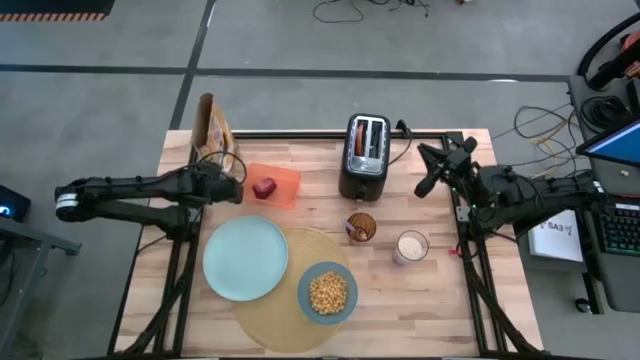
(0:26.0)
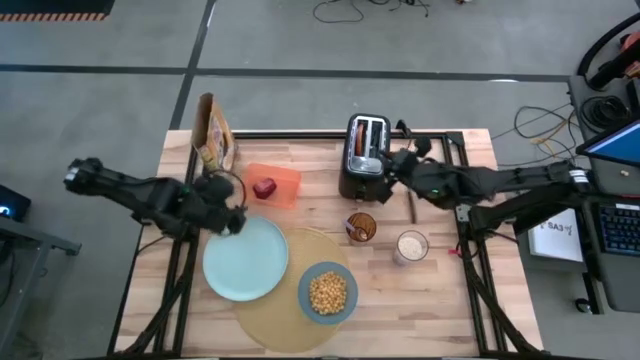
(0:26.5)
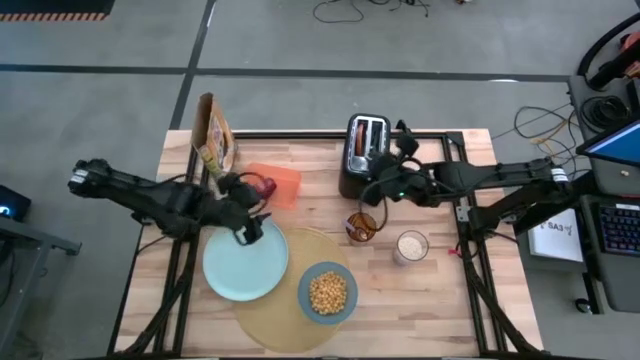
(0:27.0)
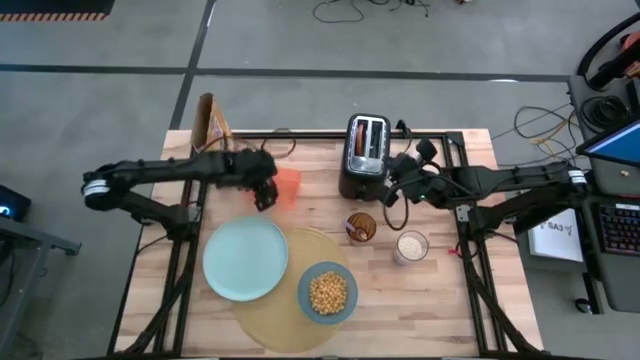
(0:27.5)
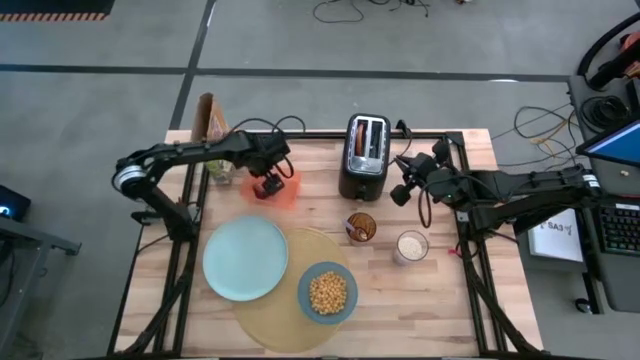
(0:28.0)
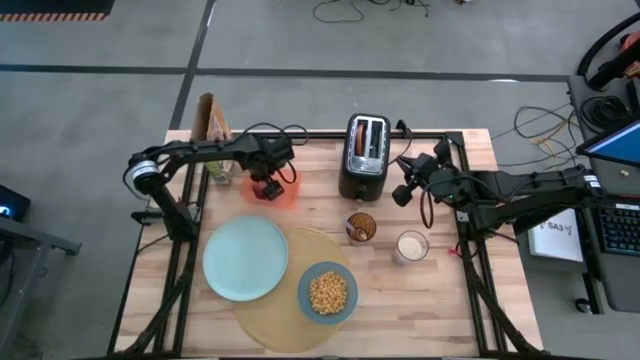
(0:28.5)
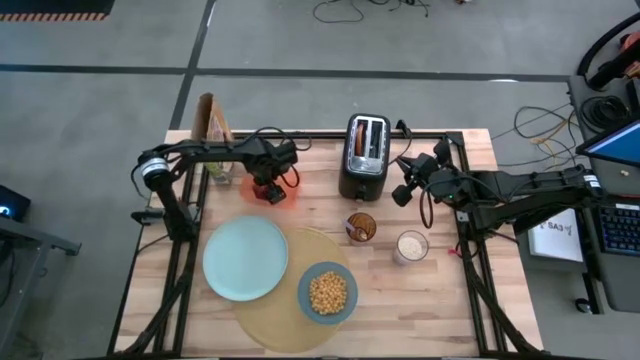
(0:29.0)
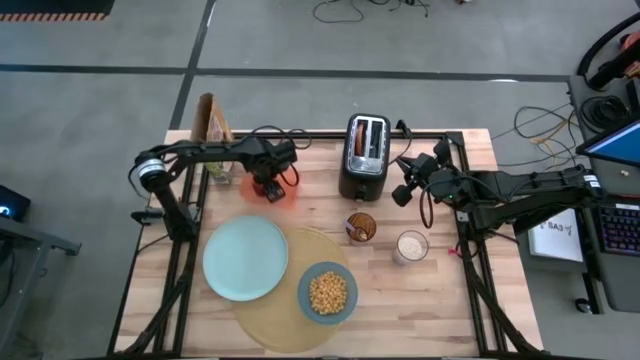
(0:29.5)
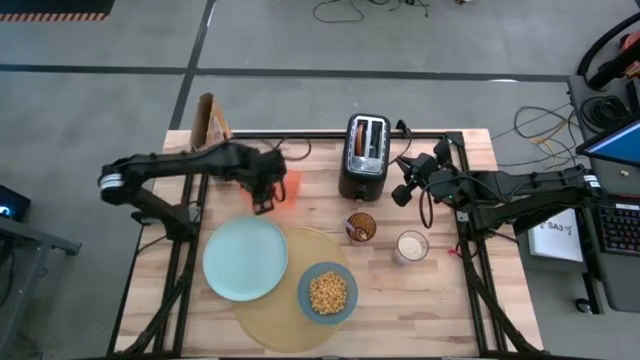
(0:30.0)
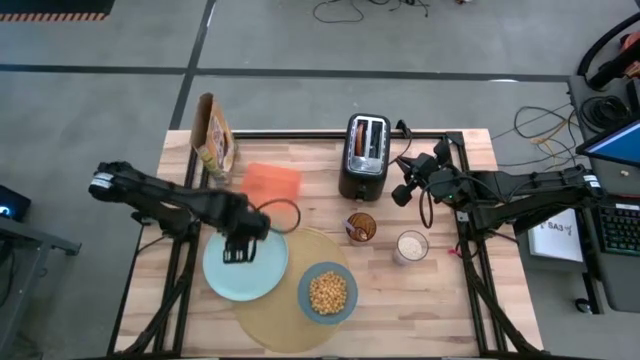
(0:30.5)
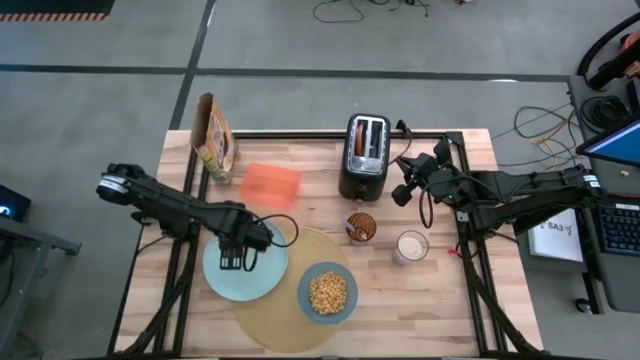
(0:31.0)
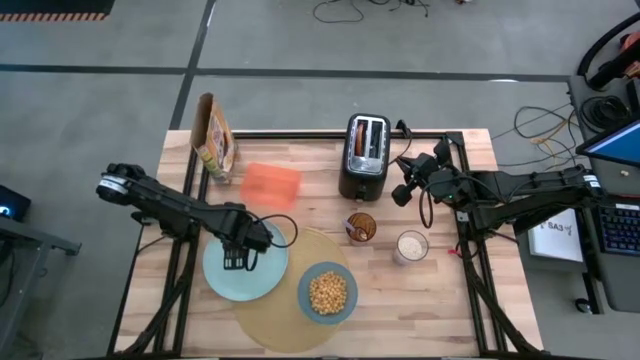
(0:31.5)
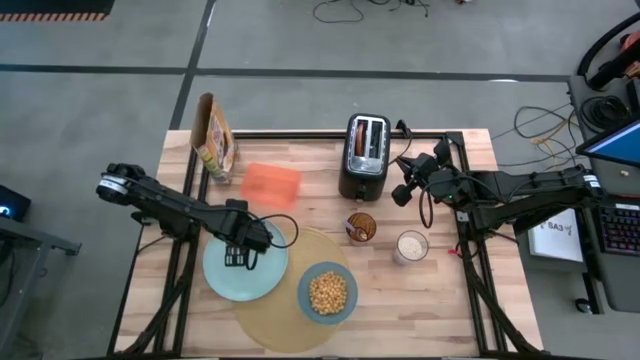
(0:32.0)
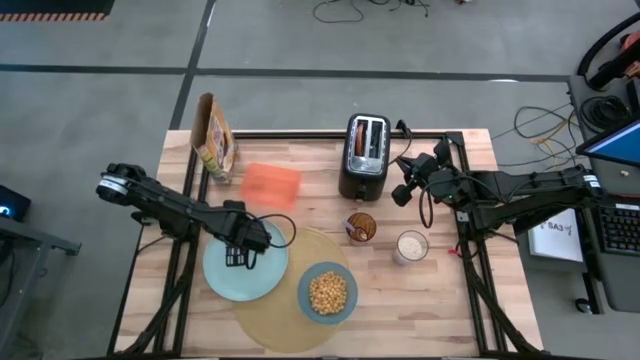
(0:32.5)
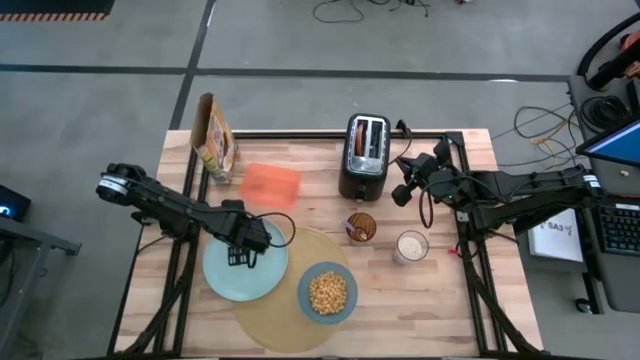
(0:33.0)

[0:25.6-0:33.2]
Task: Arrange a breakfast setting
Put the apple on the blue plate

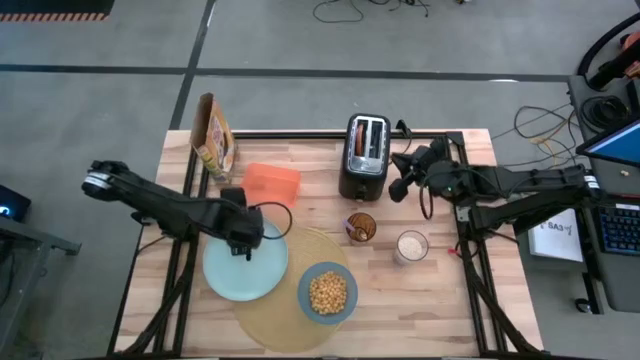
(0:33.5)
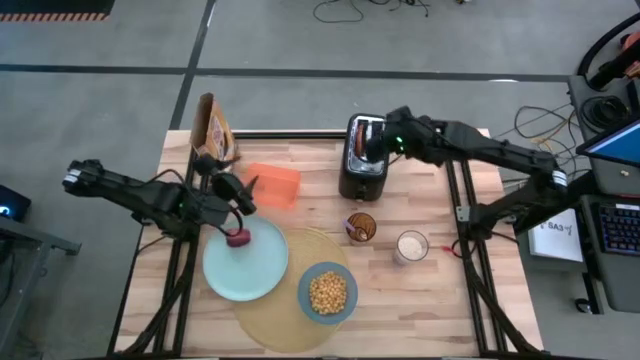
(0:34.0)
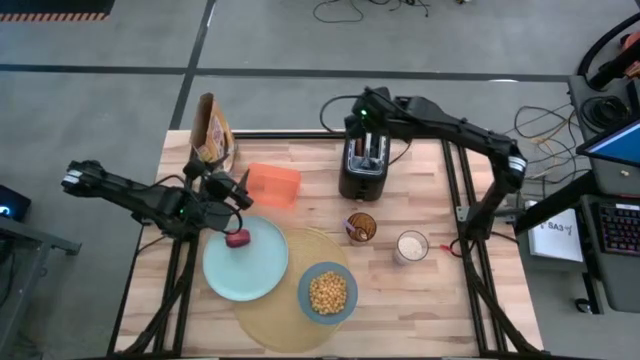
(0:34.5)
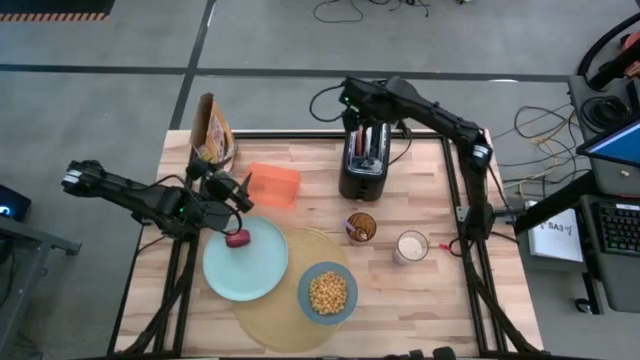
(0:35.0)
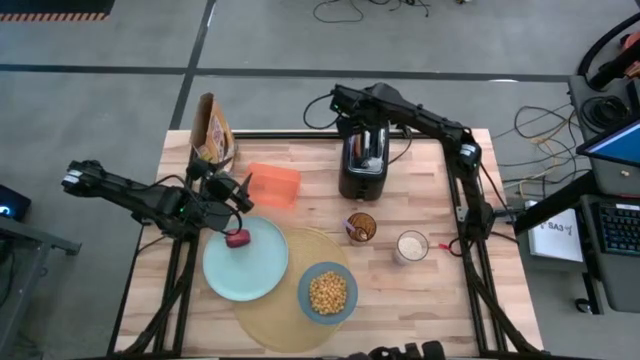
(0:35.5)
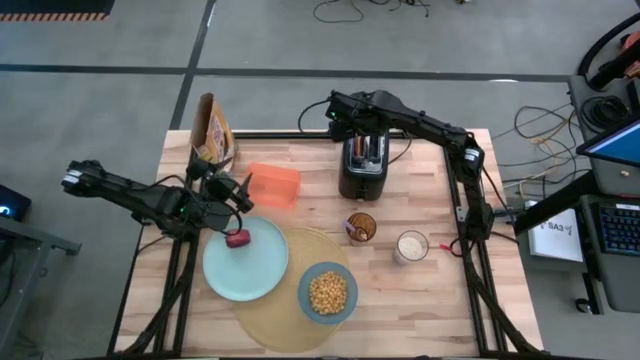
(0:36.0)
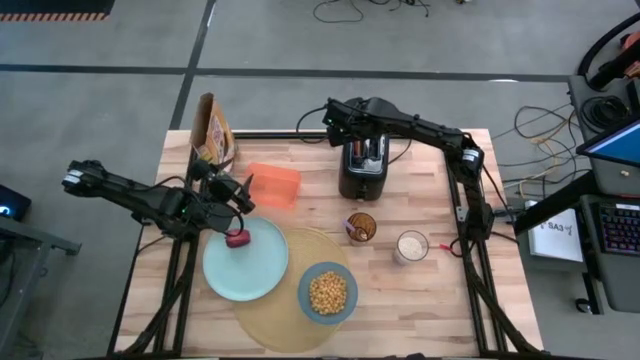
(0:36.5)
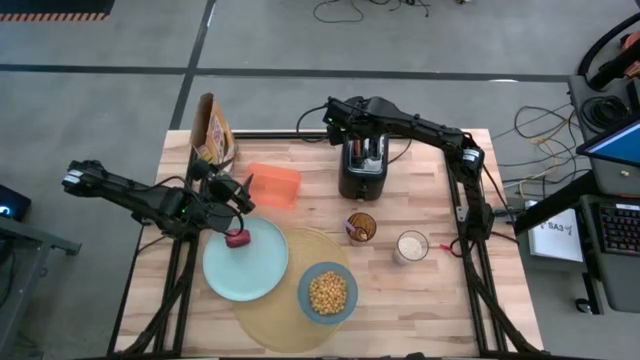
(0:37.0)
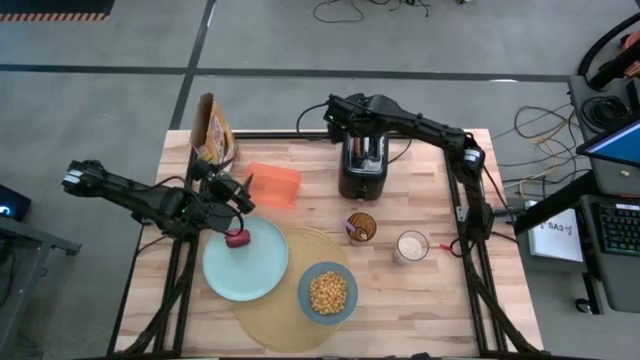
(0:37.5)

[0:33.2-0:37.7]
Put the bagel on the blue plate from the toaster

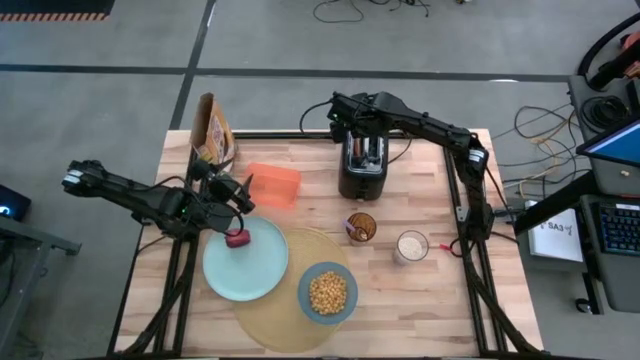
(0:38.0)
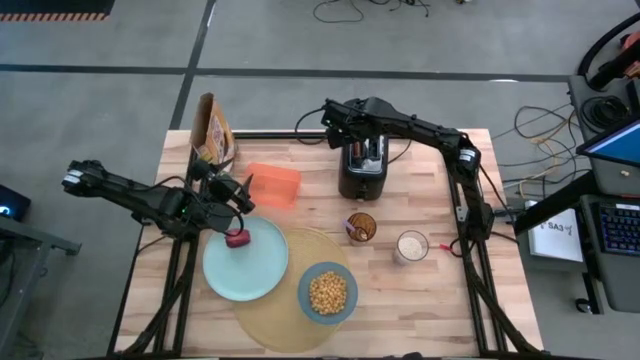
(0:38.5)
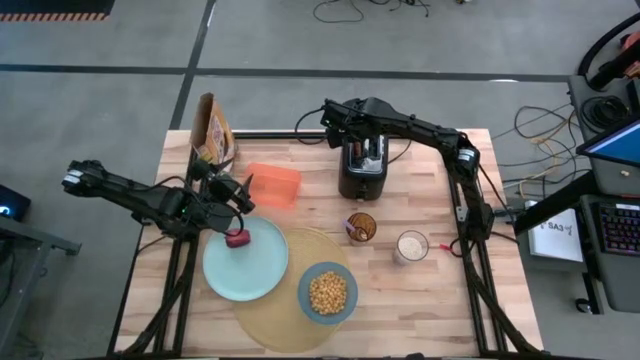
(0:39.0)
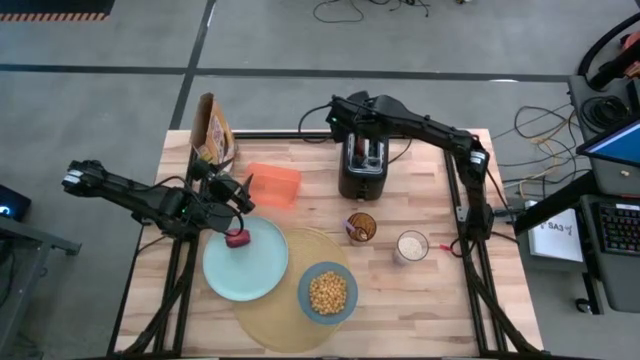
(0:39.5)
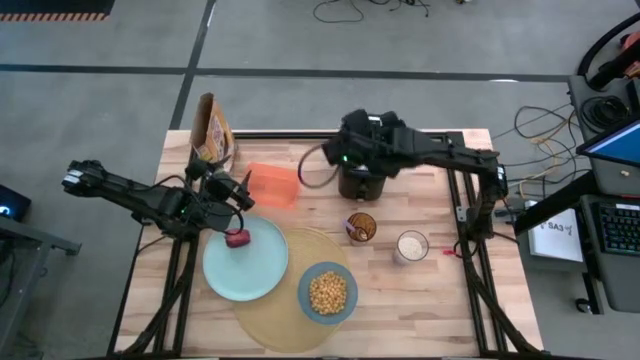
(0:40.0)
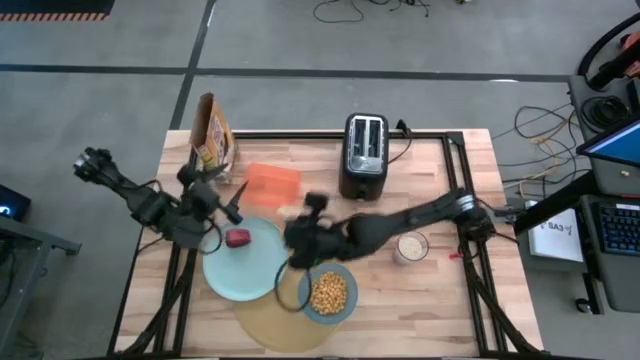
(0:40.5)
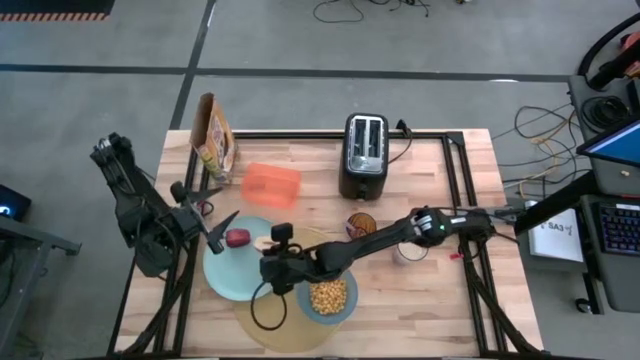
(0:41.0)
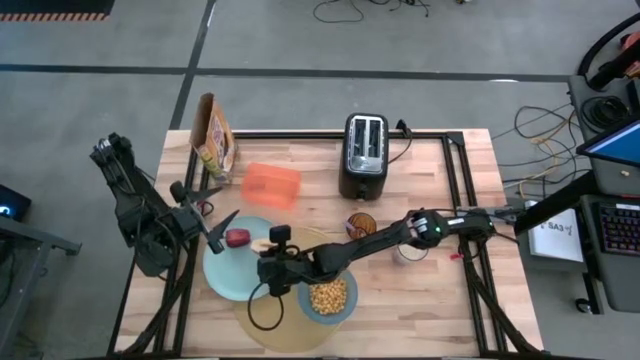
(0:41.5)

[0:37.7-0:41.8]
Put the bagel on the blue plate from the toaster

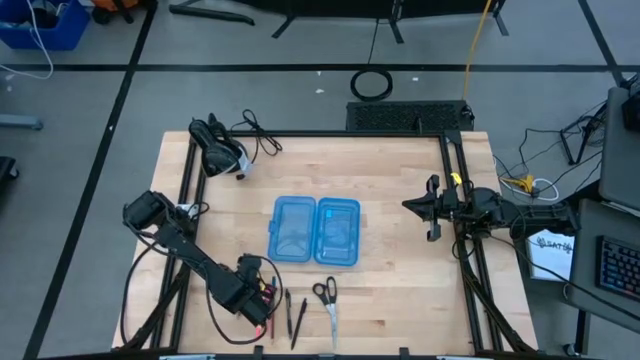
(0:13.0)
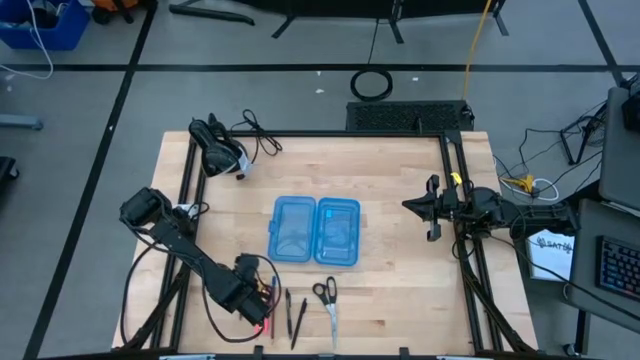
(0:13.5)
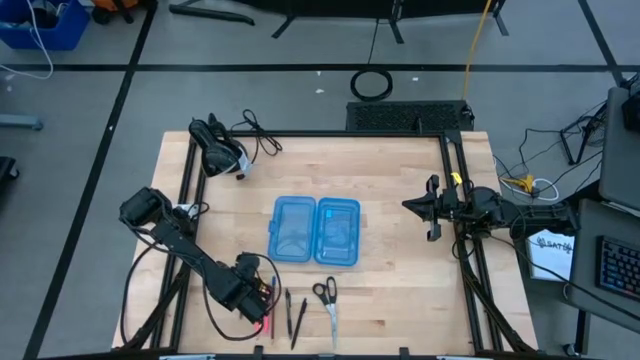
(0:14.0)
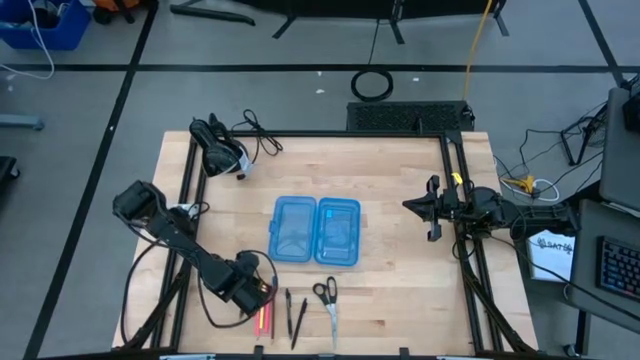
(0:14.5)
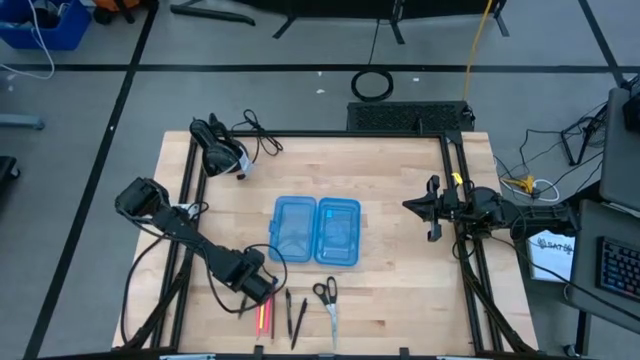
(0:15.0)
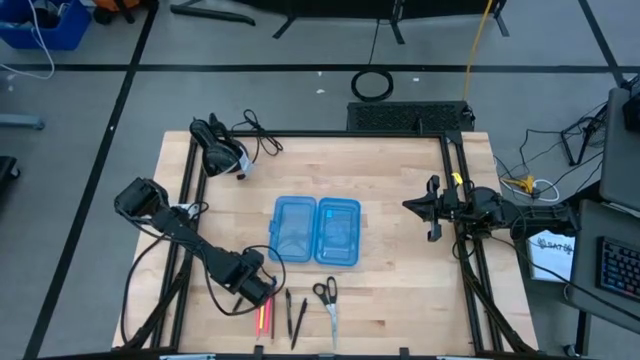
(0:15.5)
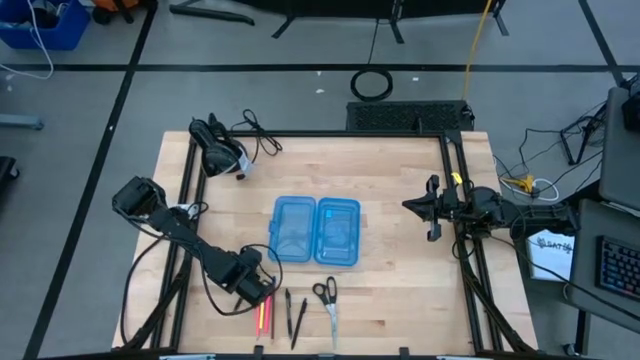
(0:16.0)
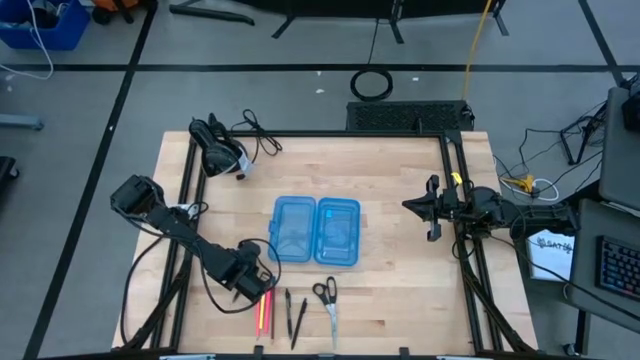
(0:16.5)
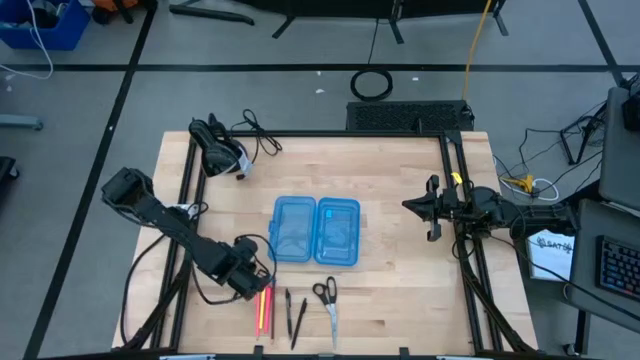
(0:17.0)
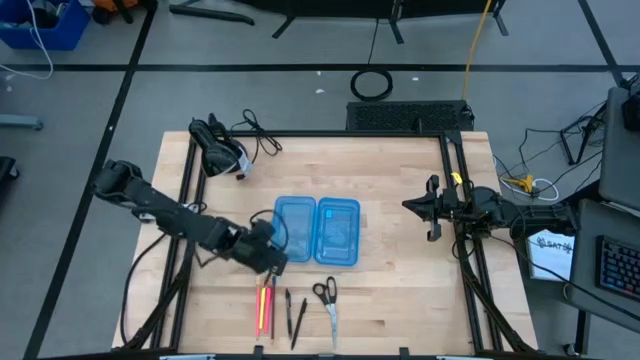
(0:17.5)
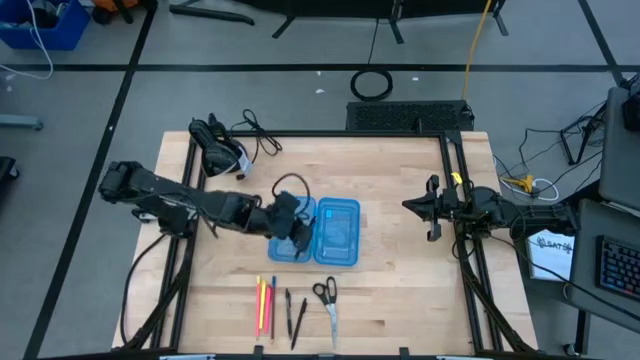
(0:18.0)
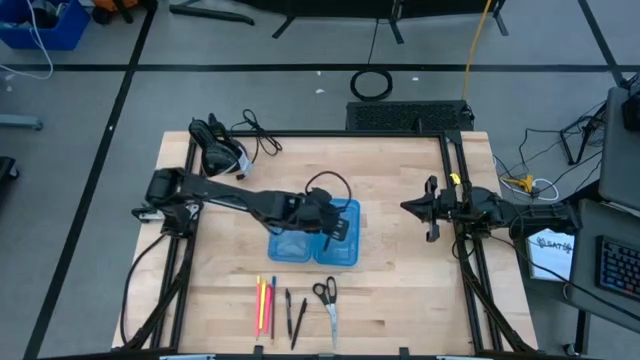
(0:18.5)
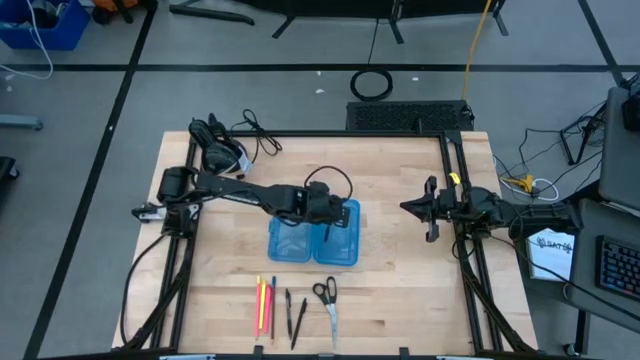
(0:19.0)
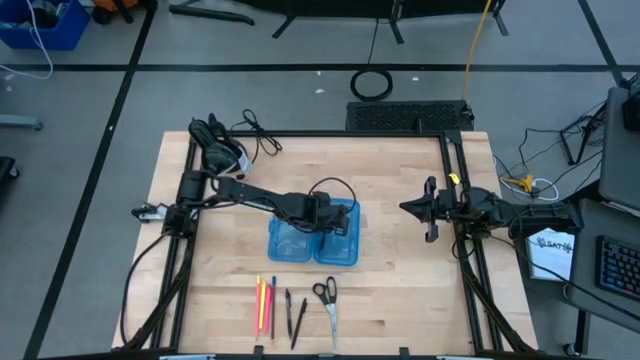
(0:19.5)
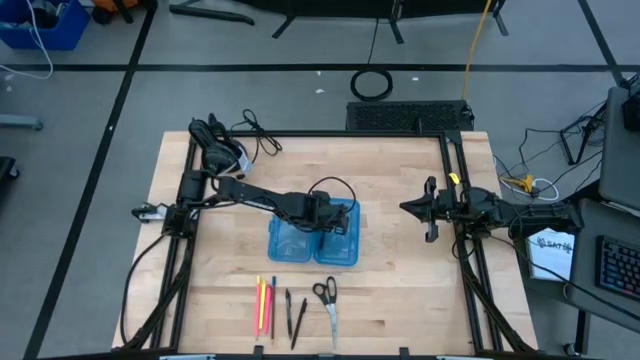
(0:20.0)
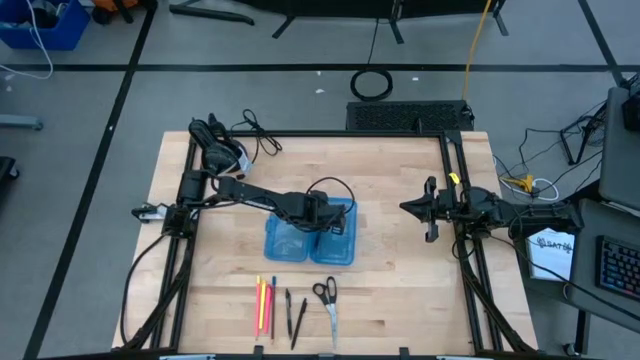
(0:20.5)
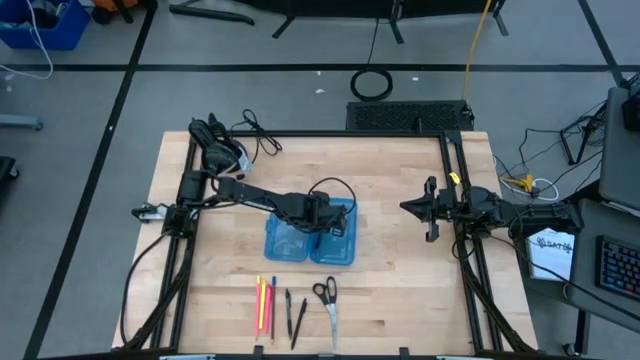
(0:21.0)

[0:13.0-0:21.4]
Task: Pick & place school supplies into a supply box
Put the left transparent black pen into the supply box
